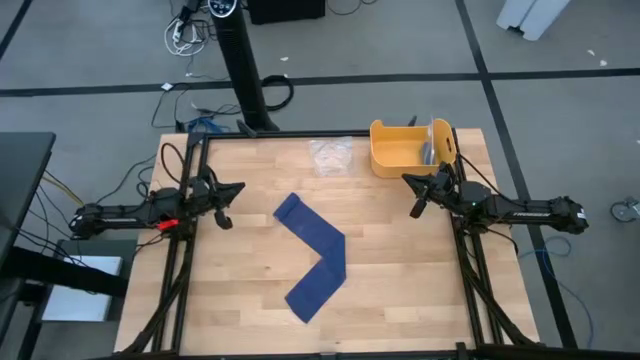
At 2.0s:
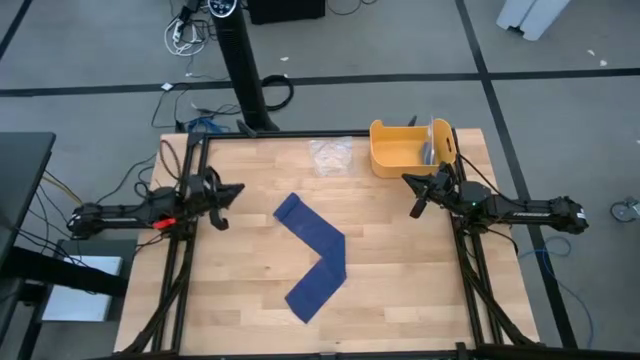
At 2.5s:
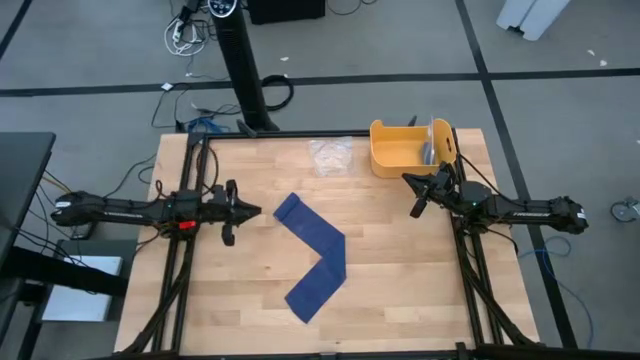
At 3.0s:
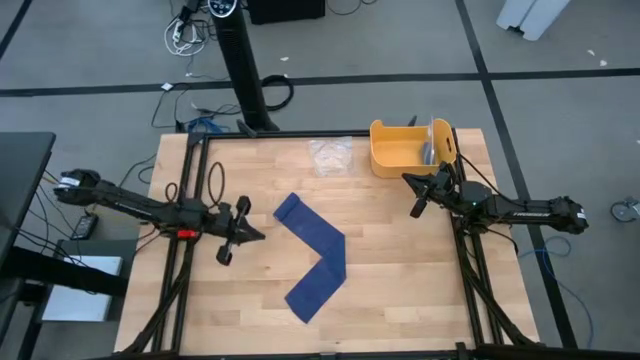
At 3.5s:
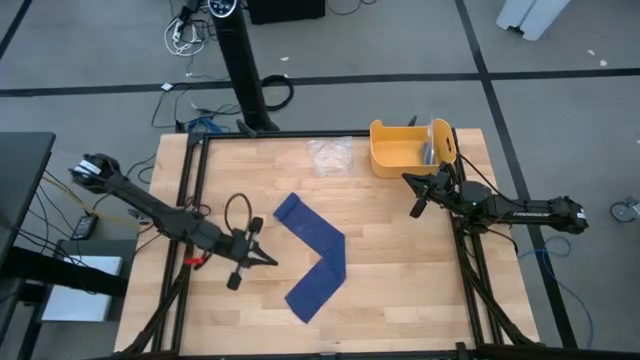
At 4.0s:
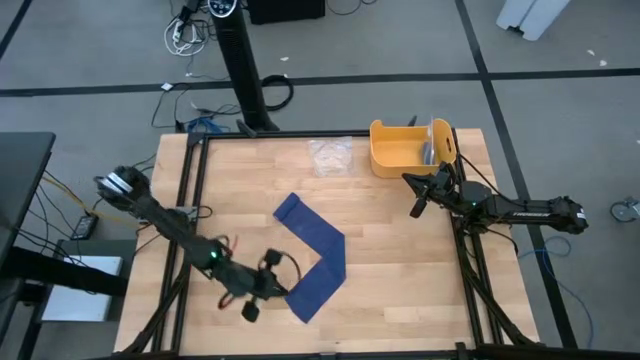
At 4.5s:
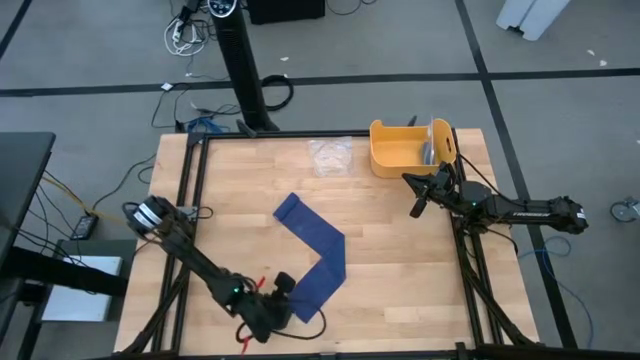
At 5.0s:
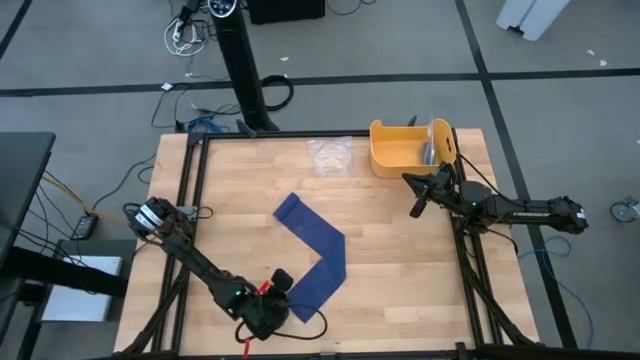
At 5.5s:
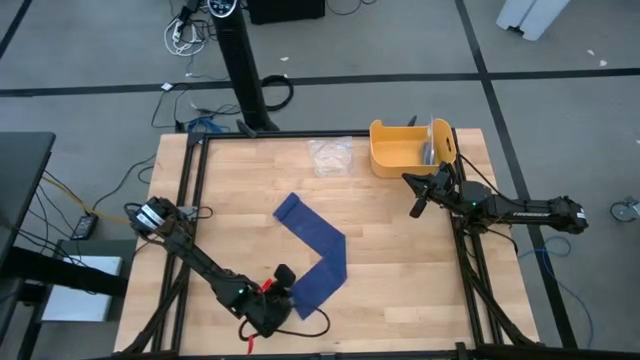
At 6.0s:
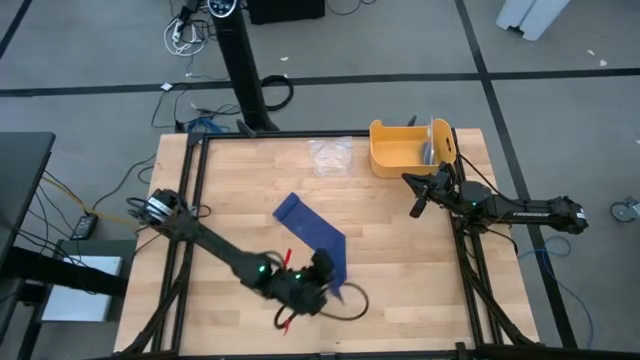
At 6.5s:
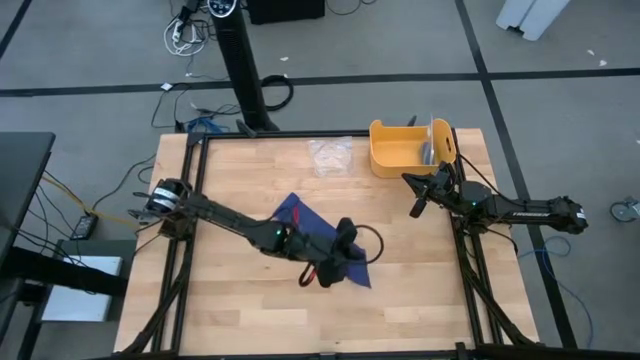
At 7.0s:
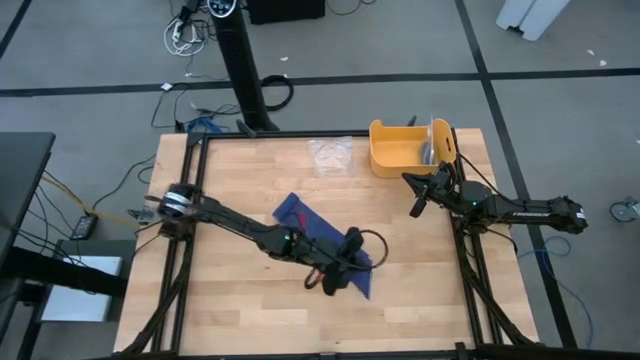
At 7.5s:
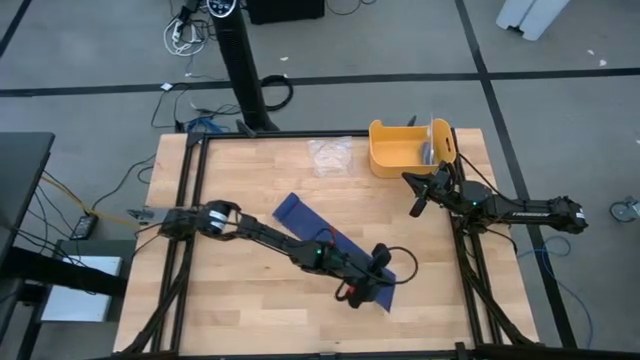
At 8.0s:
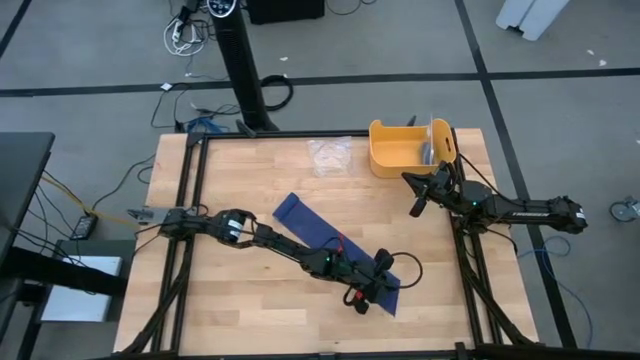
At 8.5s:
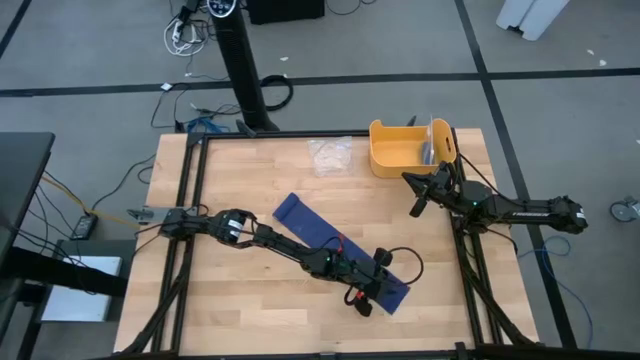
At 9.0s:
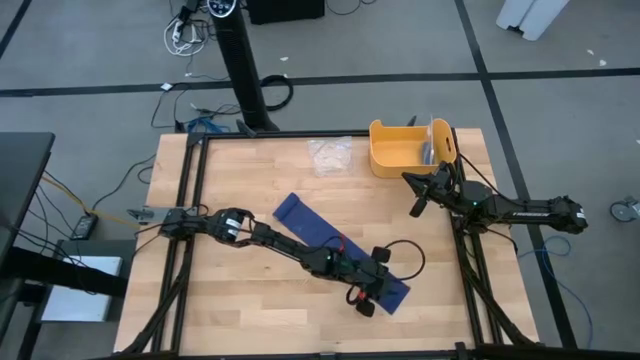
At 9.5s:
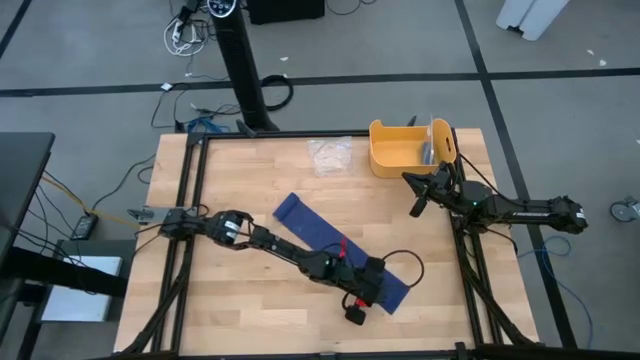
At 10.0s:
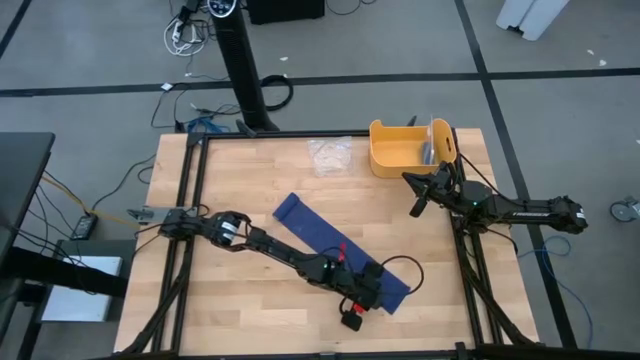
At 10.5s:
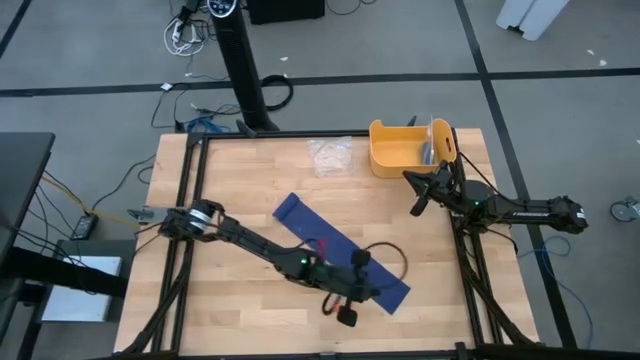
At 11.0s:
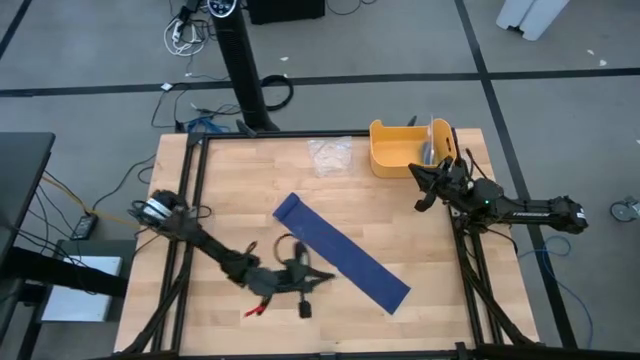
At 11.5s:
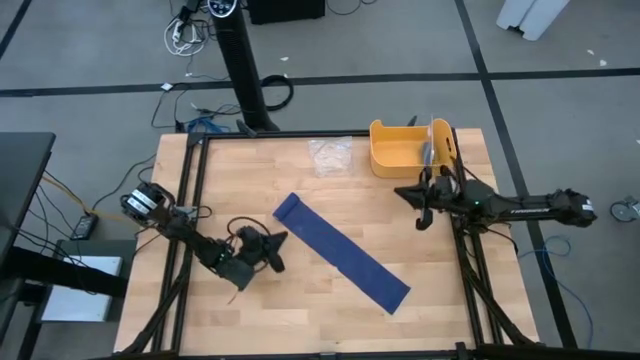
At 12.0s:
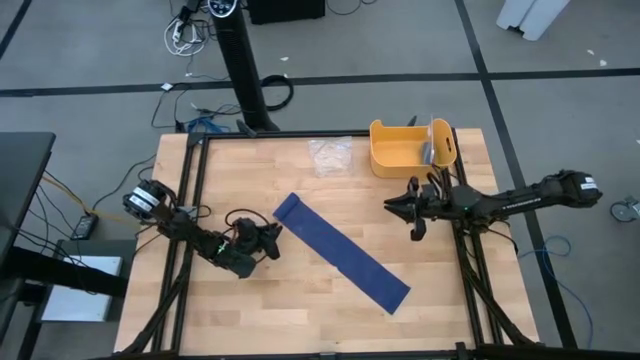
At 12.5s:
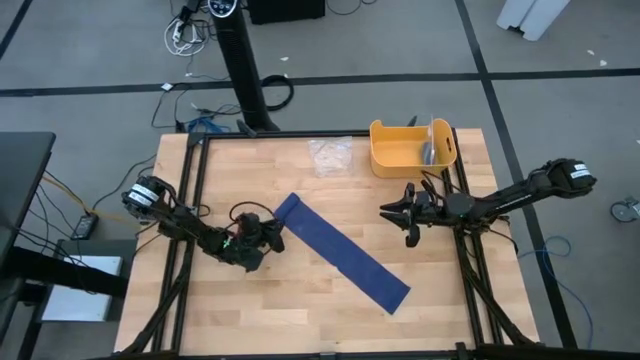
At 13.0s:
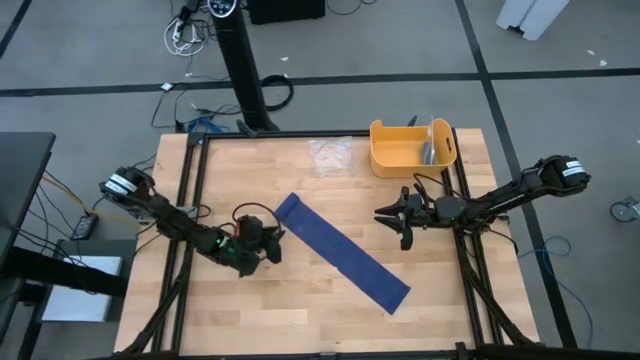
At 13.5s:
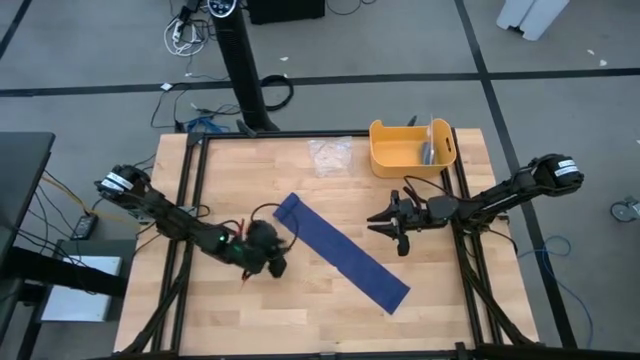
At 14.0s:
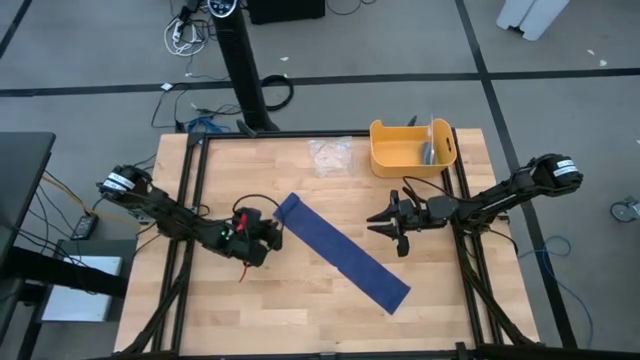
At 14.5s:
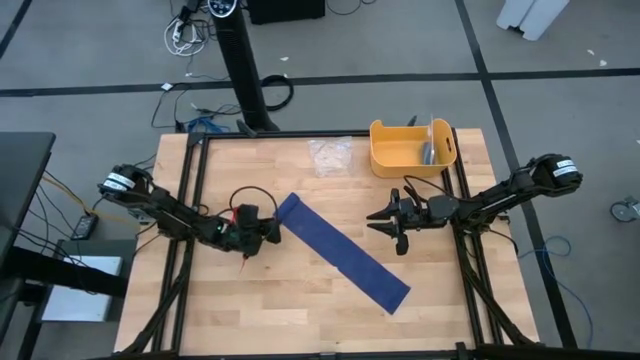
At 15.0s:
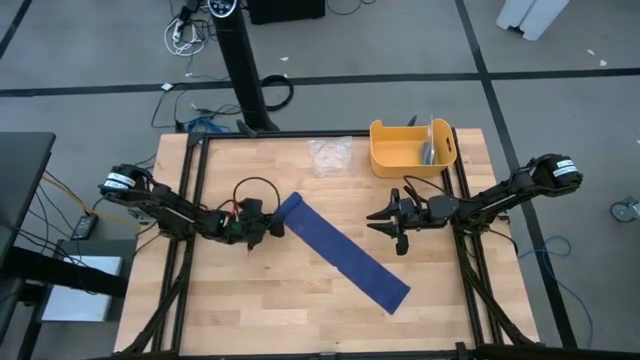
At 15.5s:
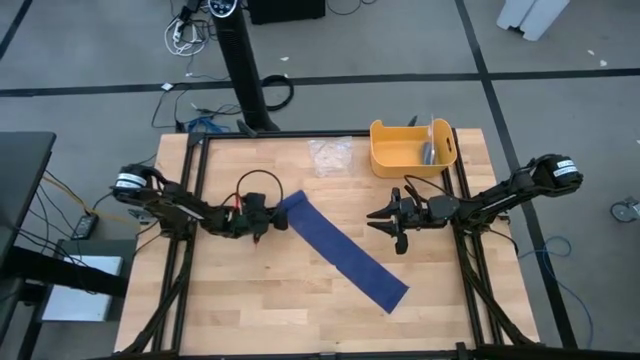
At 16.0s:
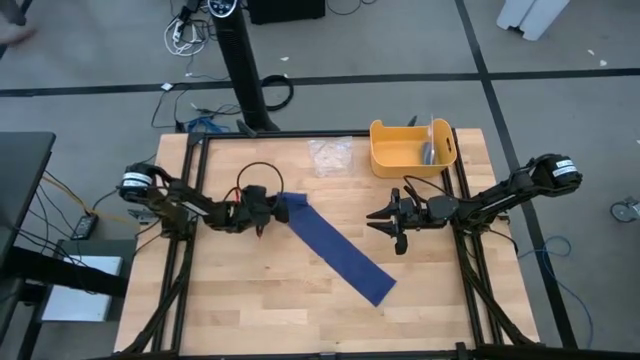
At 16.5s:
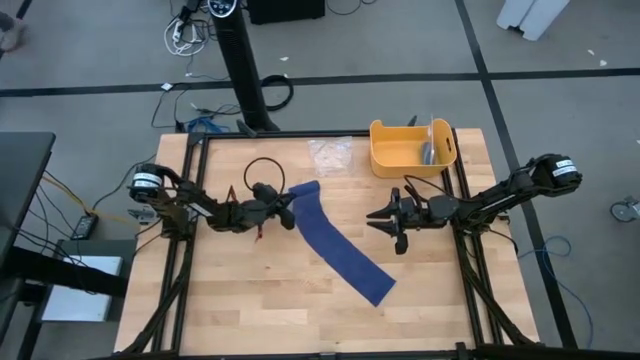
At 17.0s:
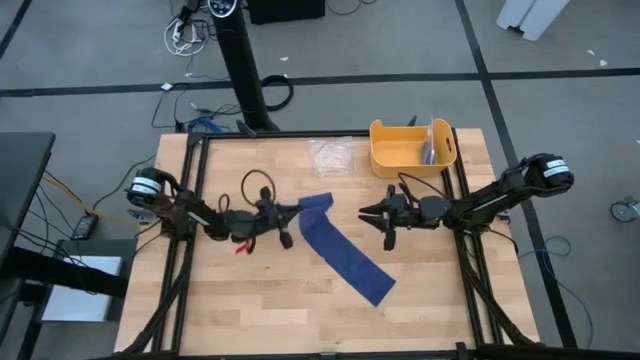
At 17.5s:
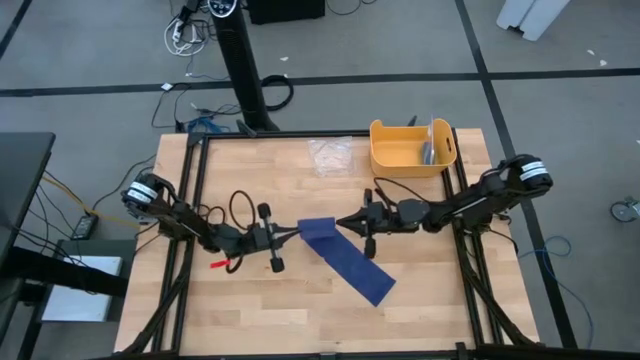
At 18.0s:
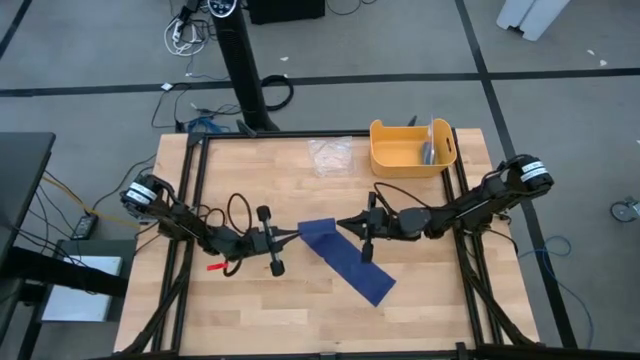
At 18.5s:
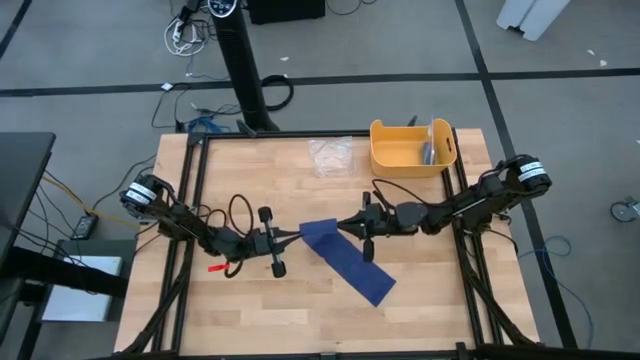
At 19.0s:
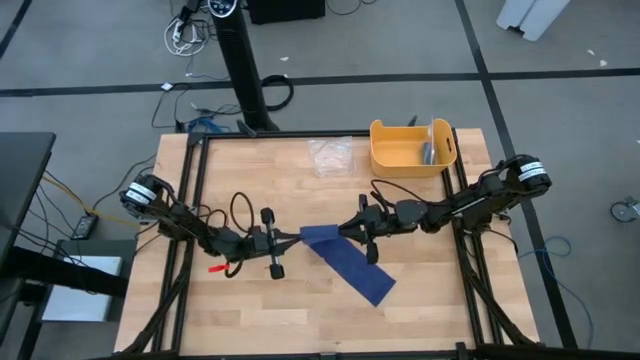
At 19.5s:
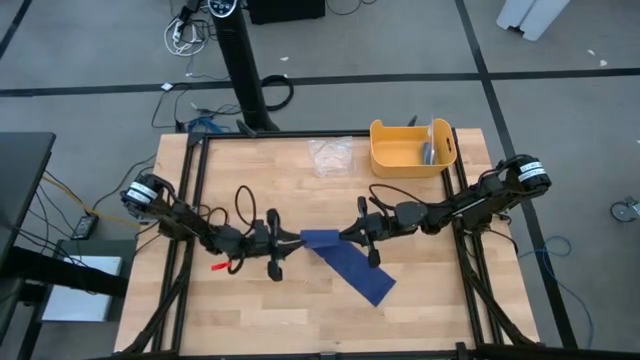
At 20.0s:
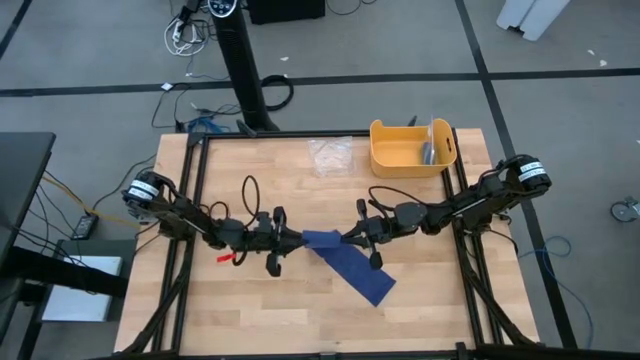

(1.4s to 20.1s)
Task: Roll bandage
Roll the violet bandage
